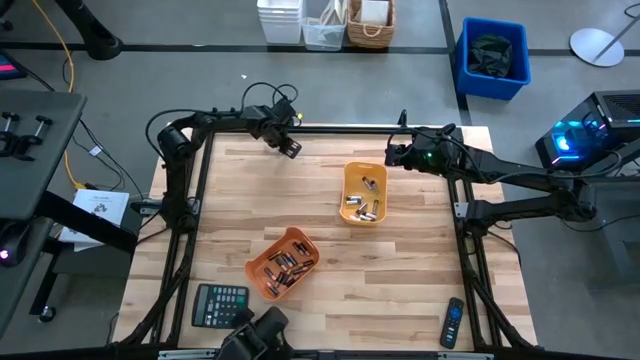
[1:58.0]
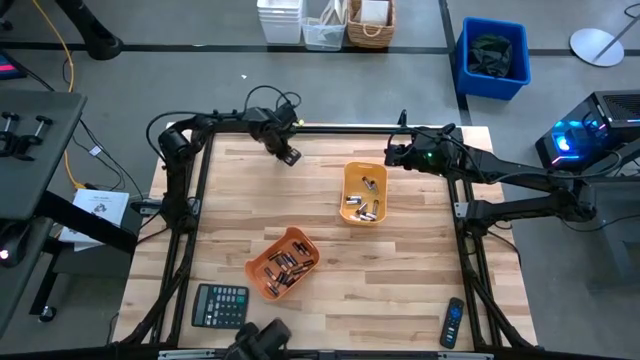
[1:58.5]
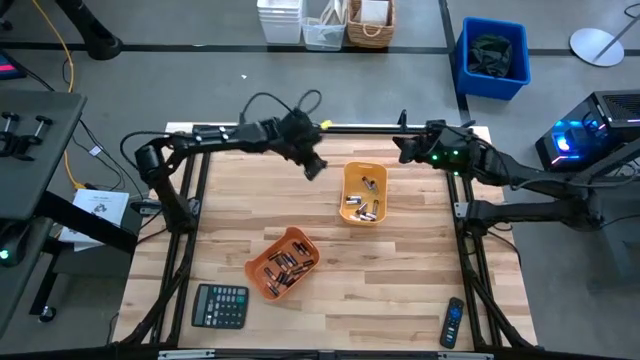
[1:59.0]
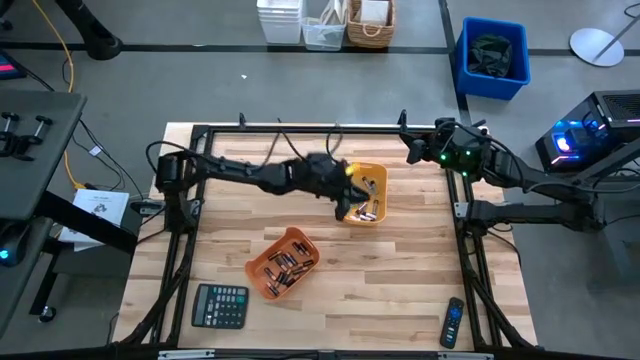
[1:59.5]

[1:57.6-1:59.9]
Task: Sort batteries
Put the silver battery into the yellow bin

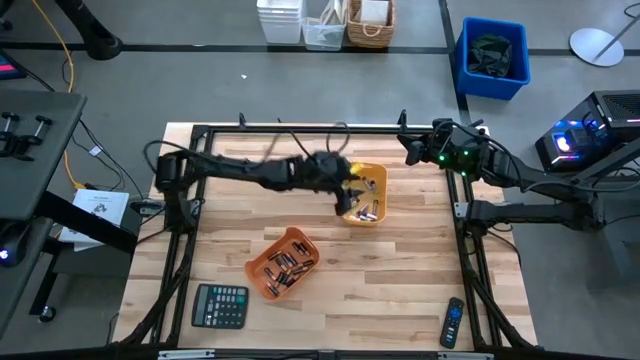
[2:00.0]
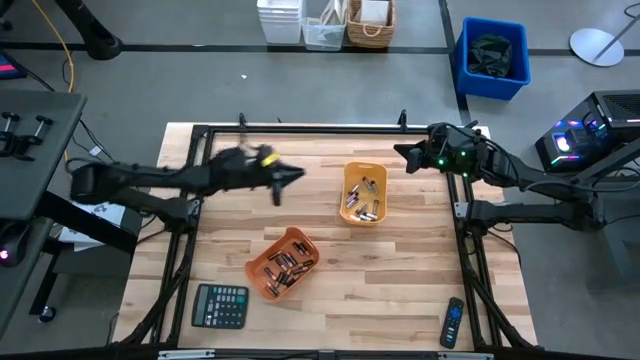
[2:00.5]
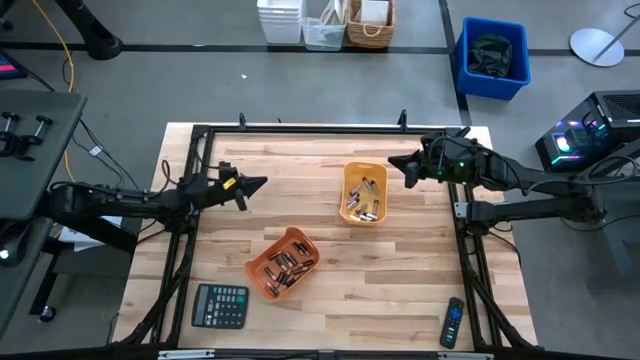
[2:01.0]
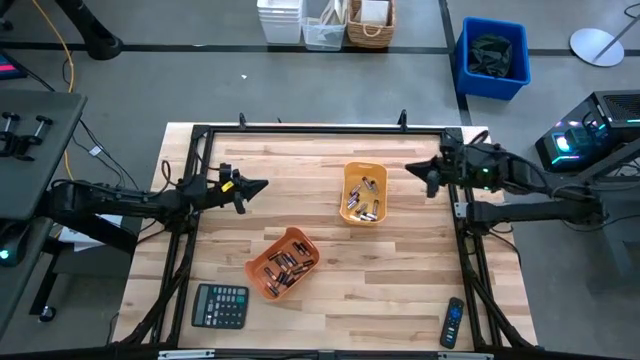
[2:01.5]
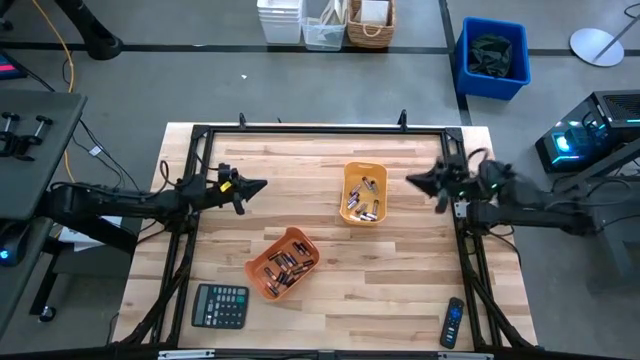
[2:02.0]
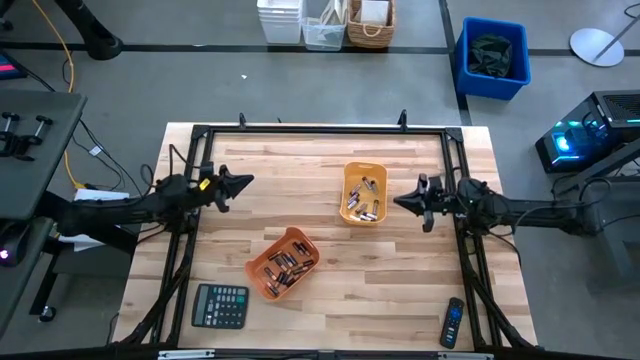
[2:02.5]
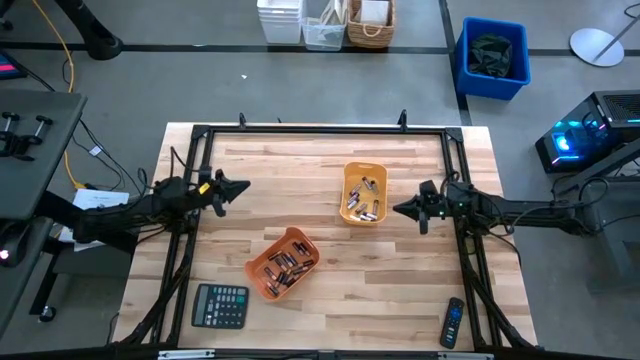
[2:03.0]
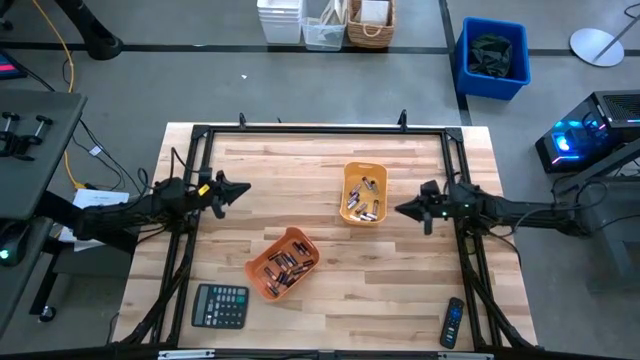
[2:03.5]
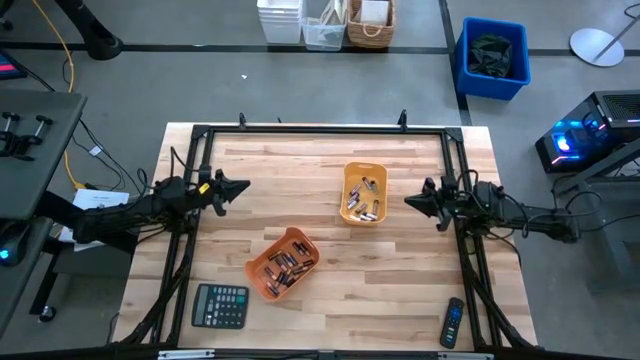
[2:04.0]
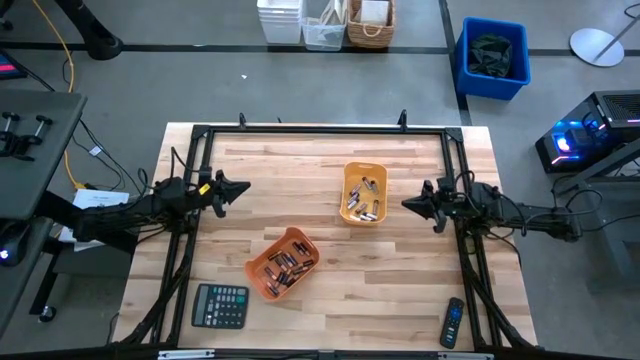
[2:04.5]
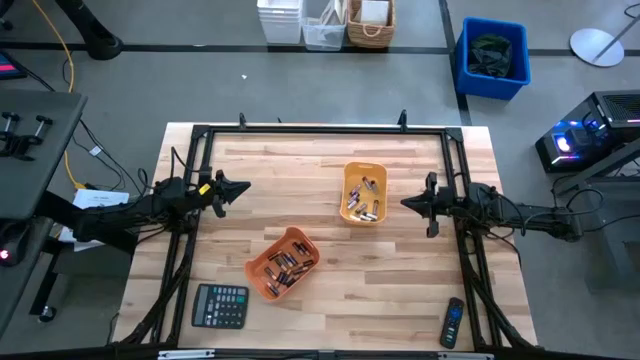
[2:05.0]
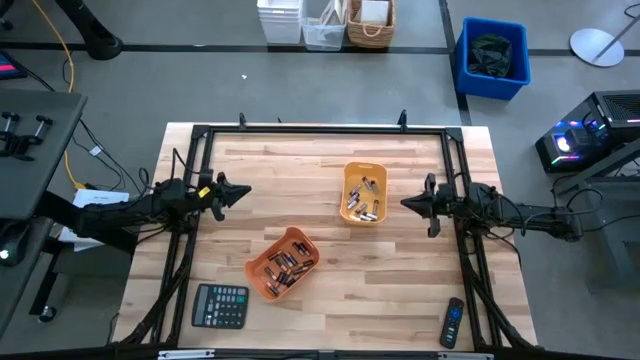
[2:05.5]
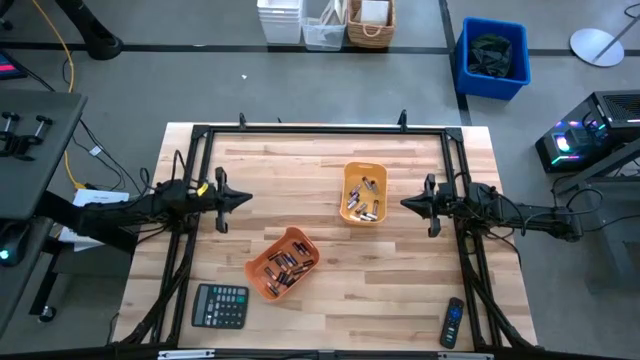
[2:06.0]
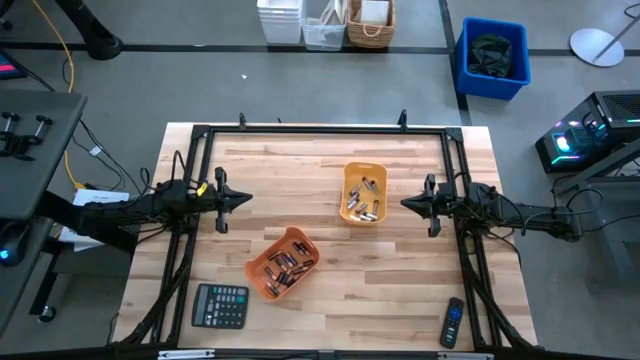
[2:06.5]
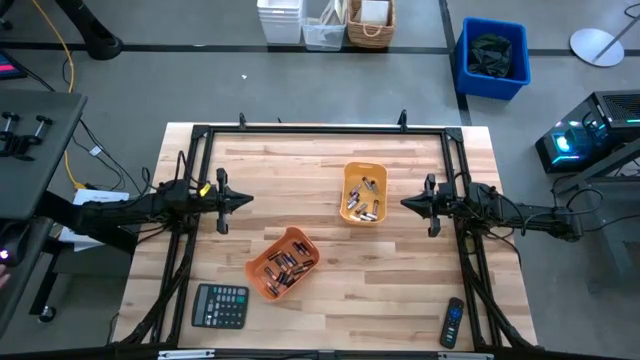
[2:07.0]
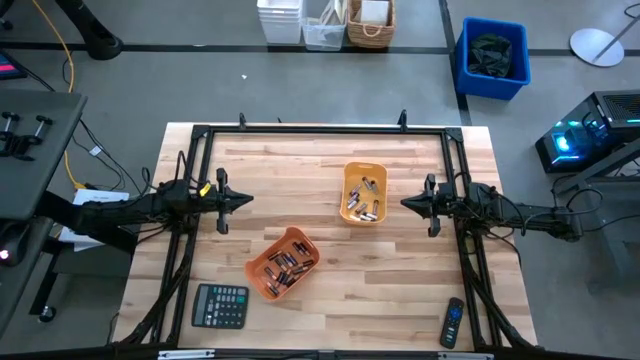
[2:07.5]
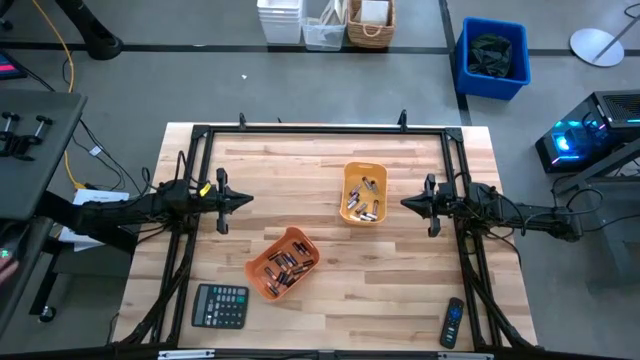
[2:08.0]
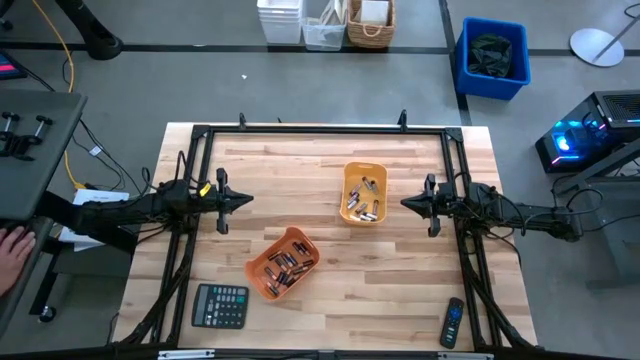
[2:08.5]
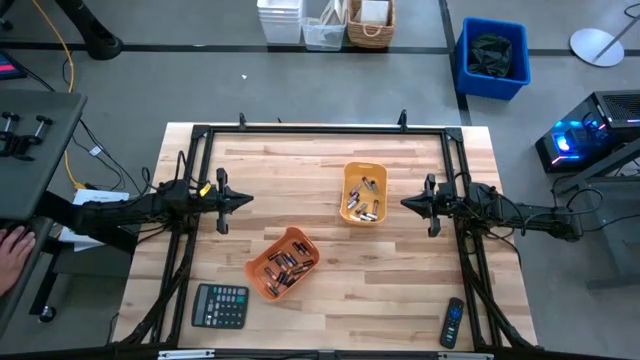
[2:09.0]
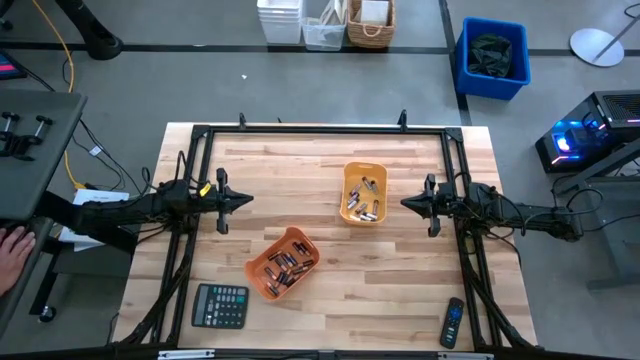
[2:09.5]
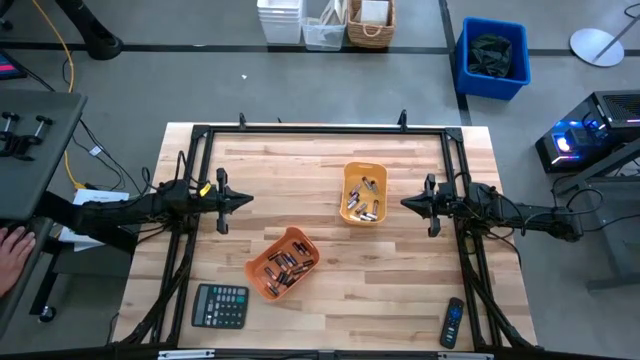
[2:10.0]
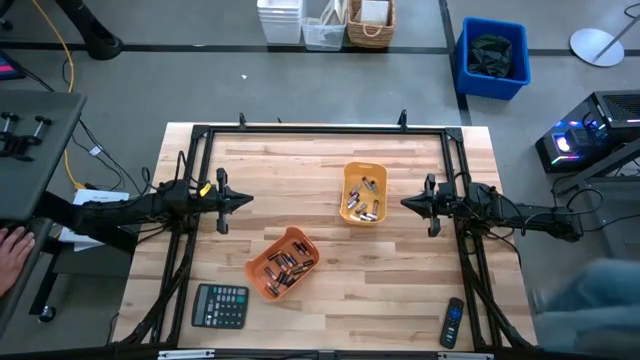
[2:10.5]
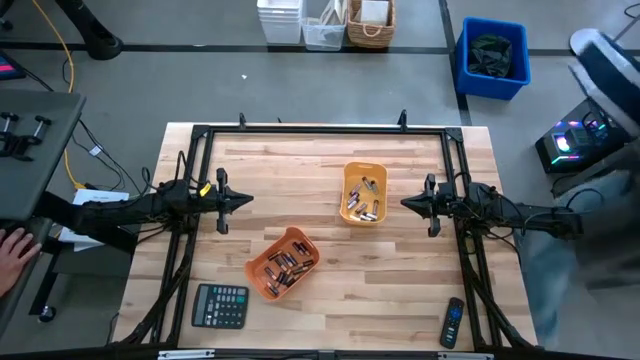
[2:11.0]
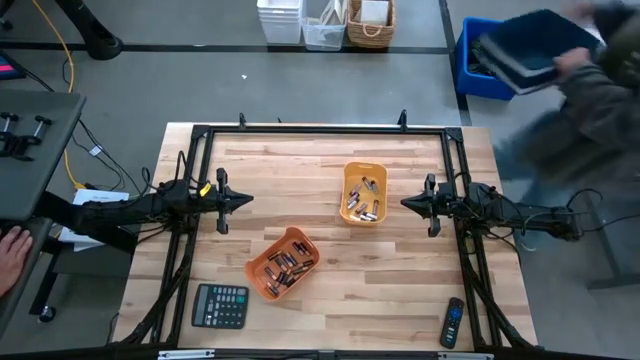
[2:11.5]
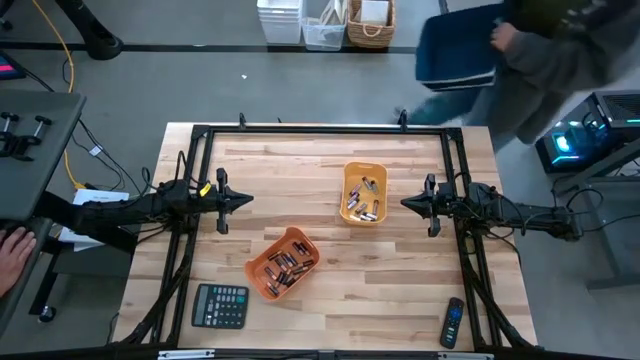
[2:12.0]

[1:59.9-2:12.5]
Return to Home Position

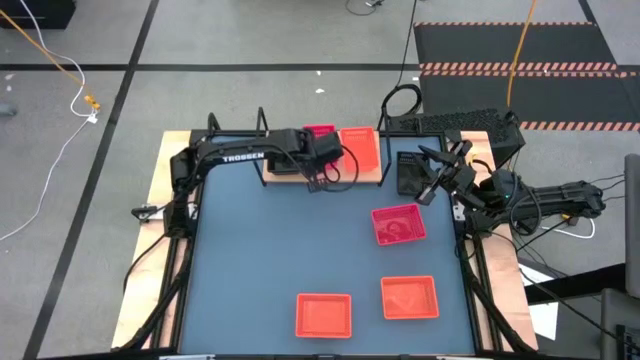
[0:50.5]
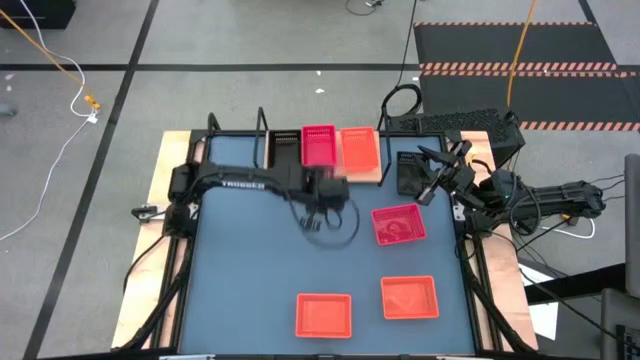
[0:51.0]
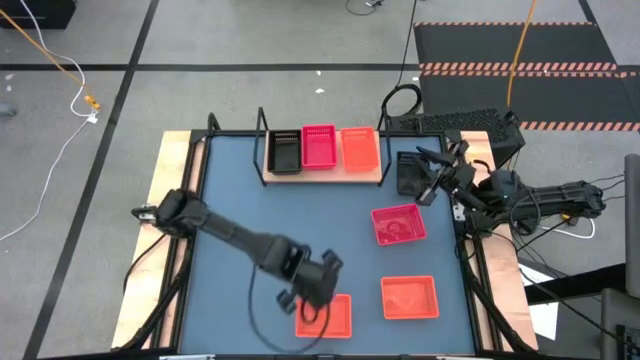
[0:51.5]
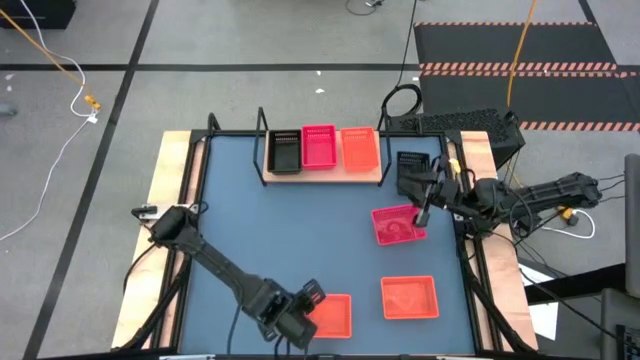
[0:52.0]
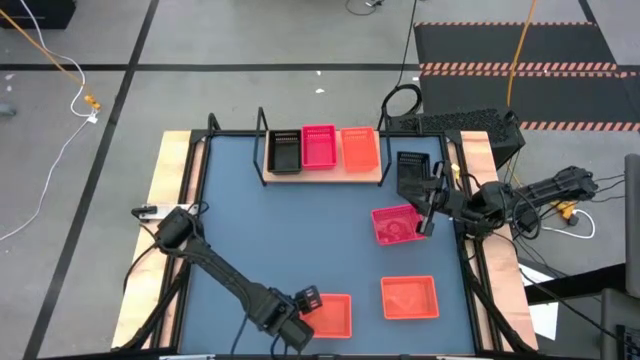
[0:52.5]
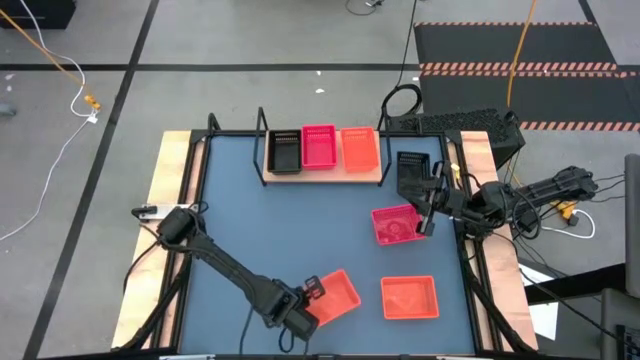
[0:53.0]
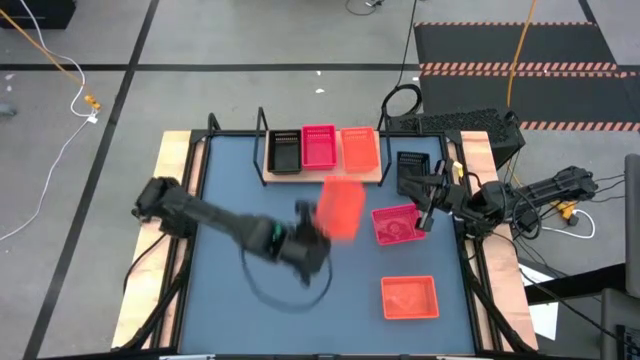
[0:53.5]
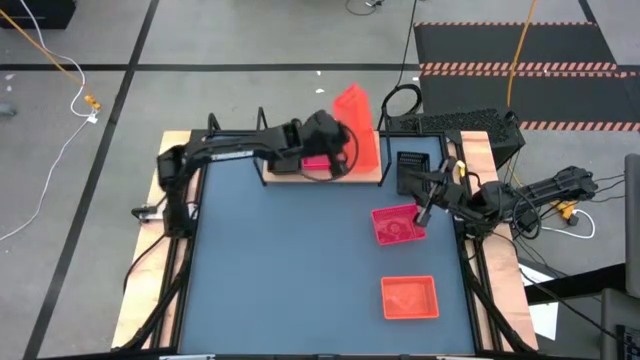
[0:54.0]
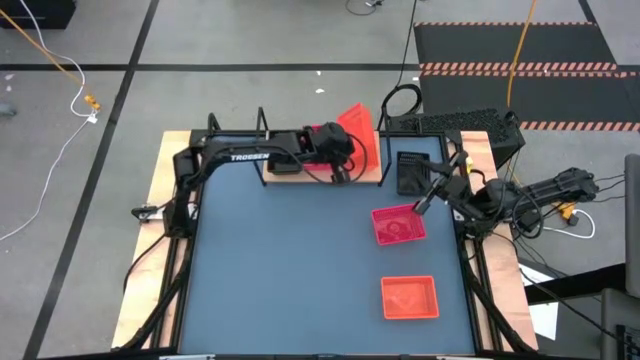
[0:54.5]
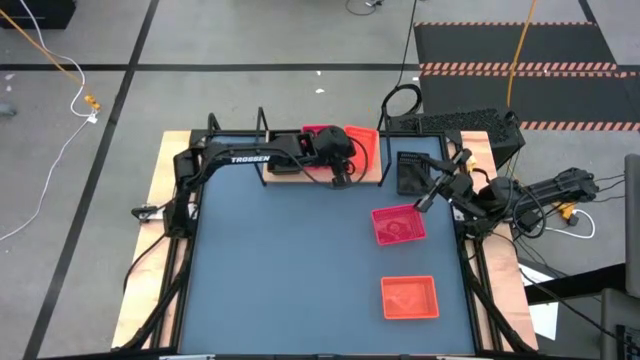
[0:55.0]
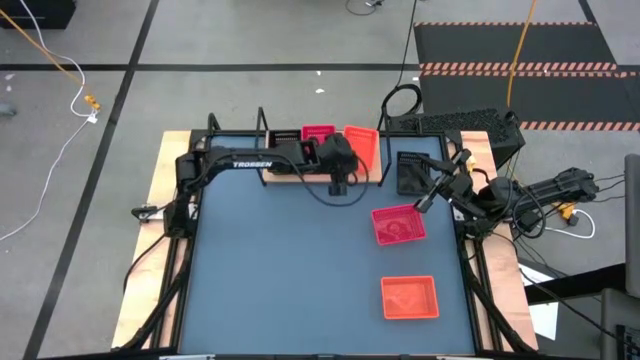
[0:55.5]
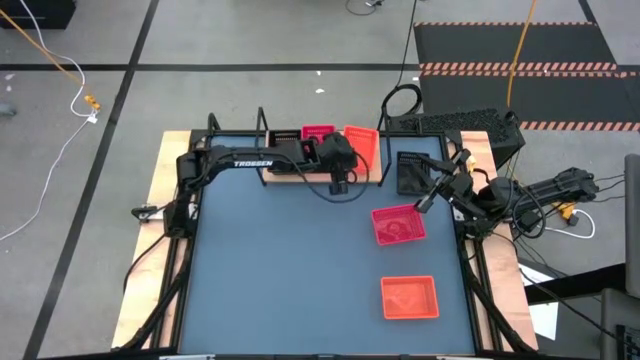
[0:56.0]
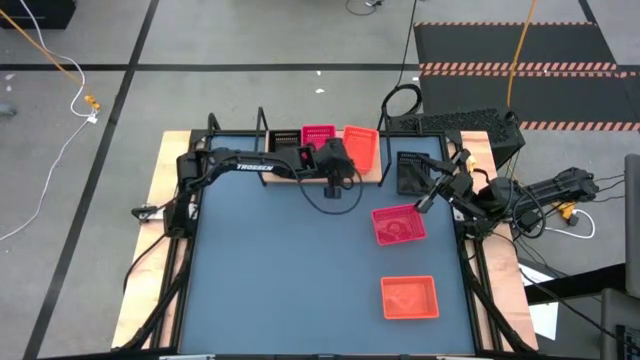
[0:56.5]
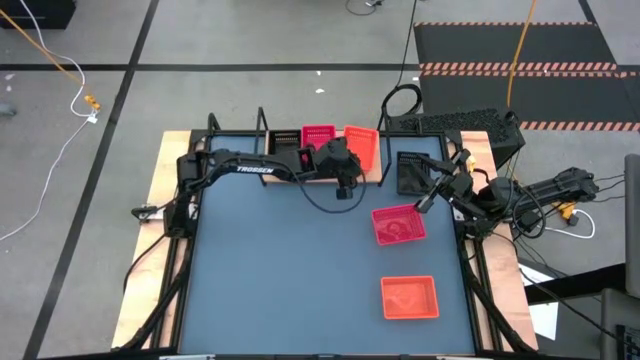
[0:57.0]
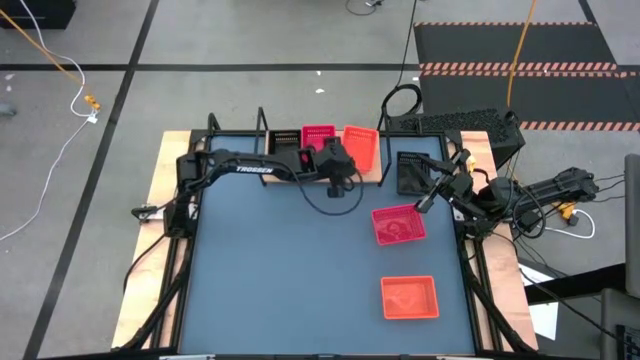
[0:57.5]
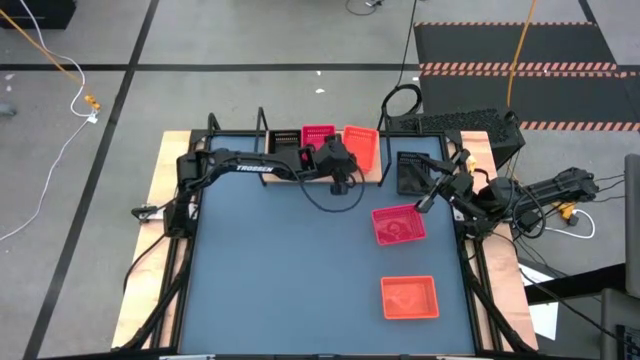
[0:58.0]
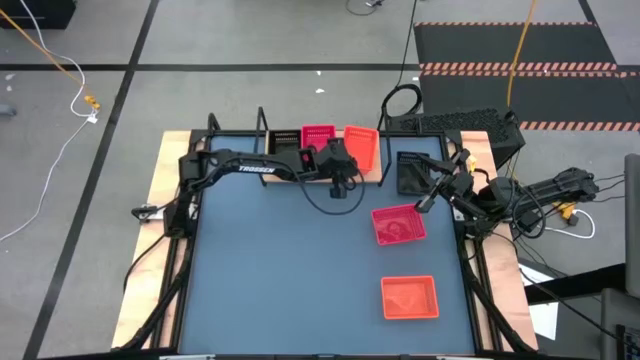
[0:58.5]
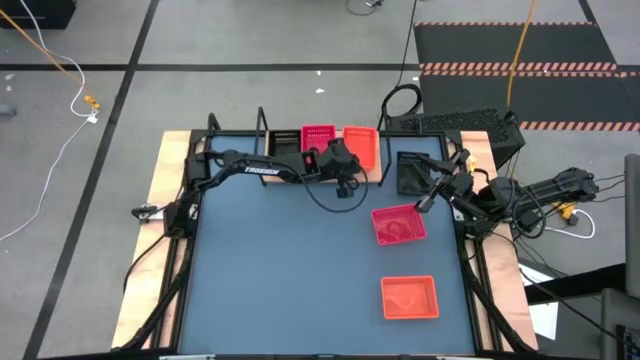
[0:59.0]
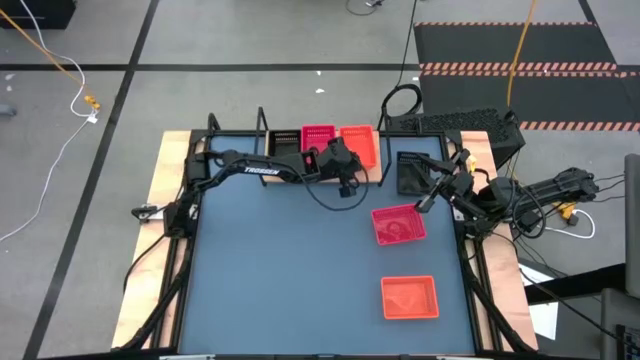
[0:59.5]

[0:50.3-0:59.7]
Task: Stack baskets on shelf by color
Stack the left orange bin on top of the other orange bin on the shelf
